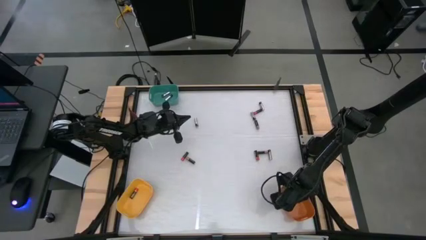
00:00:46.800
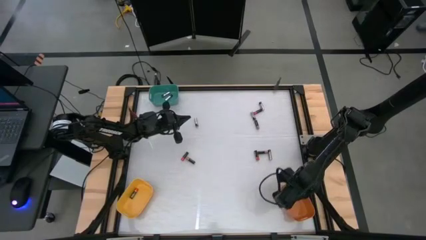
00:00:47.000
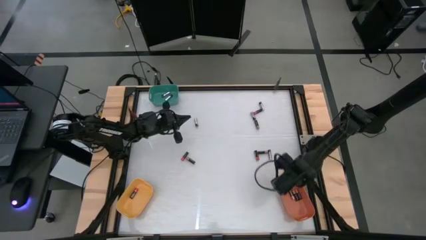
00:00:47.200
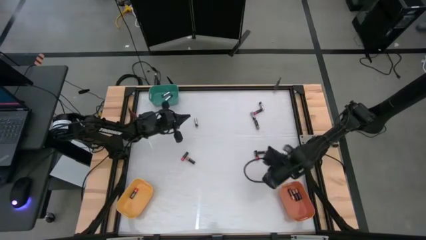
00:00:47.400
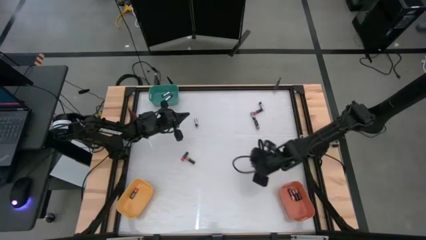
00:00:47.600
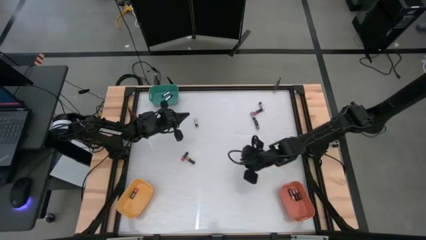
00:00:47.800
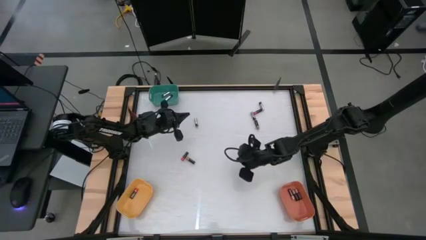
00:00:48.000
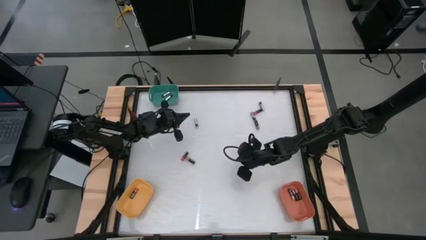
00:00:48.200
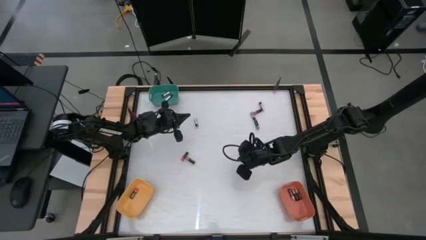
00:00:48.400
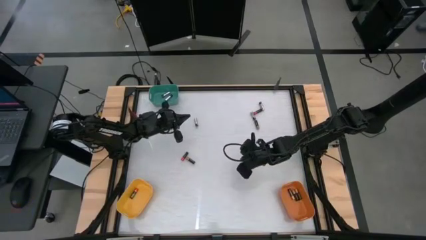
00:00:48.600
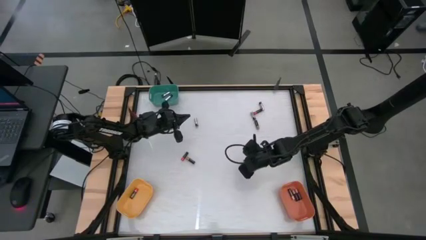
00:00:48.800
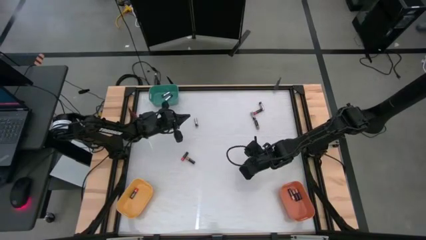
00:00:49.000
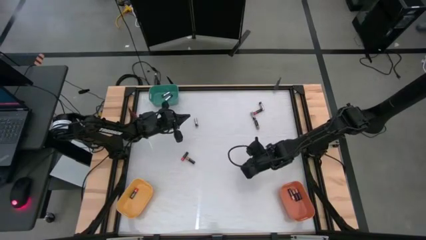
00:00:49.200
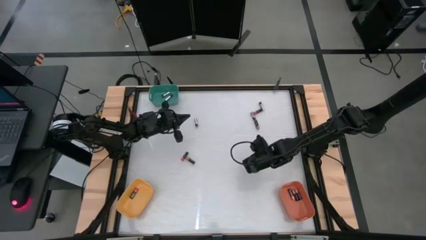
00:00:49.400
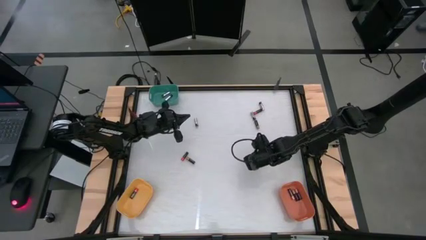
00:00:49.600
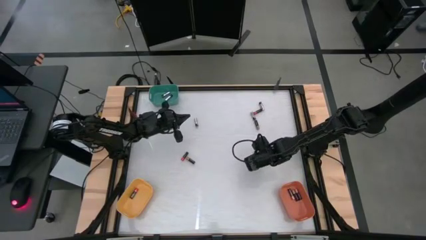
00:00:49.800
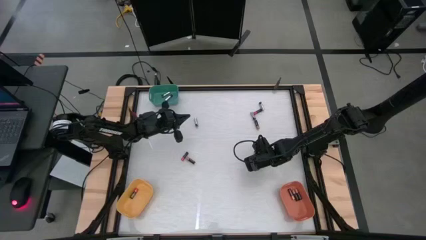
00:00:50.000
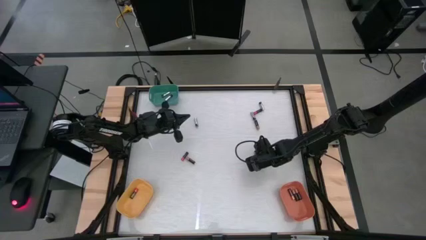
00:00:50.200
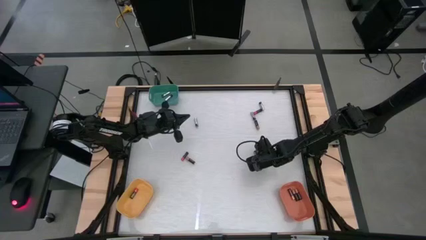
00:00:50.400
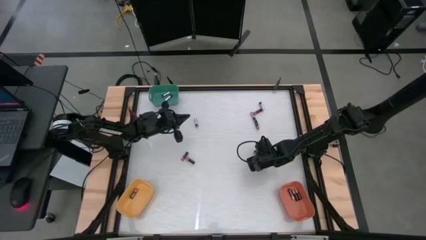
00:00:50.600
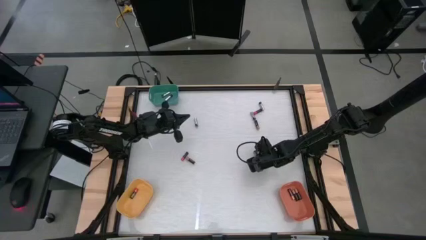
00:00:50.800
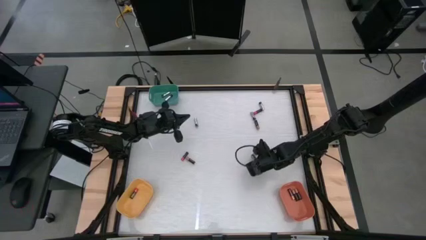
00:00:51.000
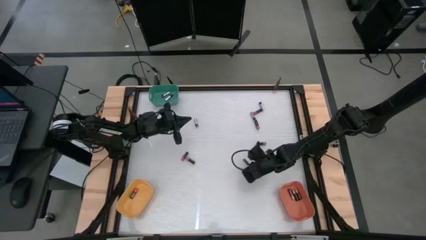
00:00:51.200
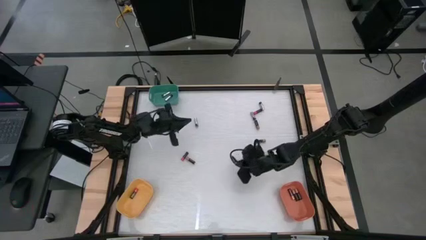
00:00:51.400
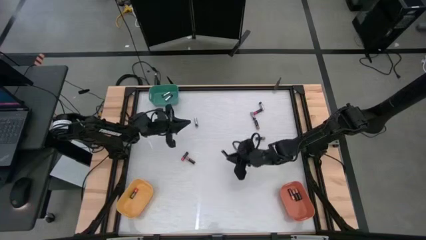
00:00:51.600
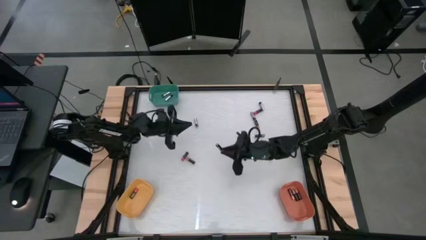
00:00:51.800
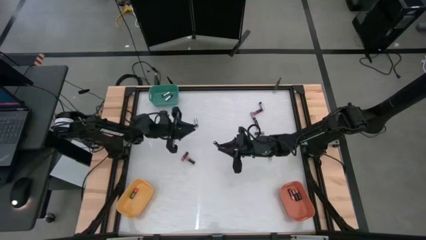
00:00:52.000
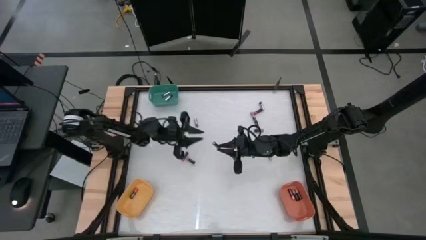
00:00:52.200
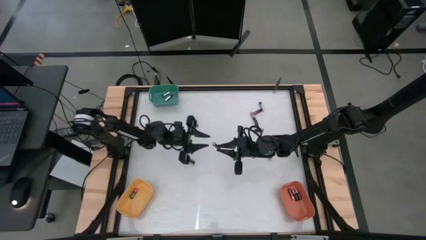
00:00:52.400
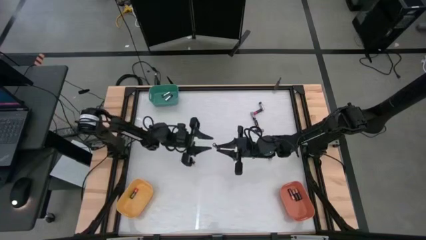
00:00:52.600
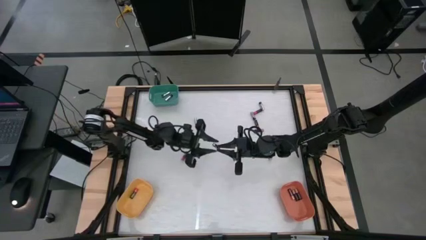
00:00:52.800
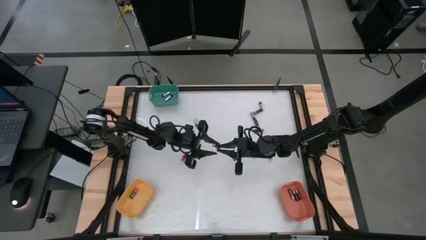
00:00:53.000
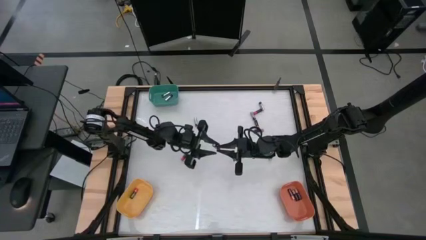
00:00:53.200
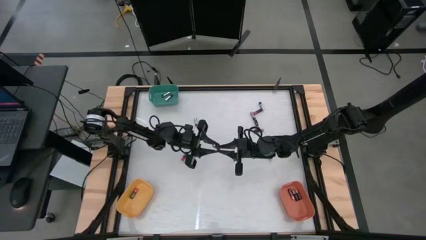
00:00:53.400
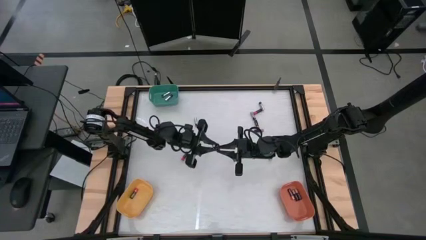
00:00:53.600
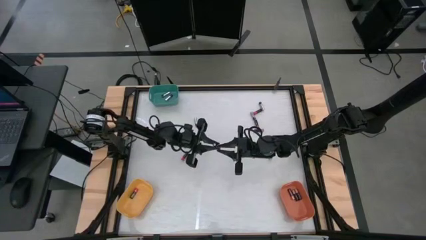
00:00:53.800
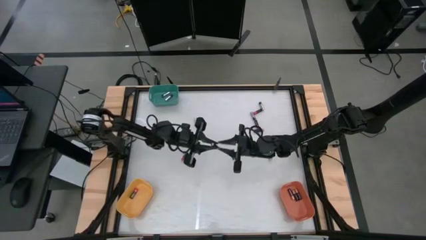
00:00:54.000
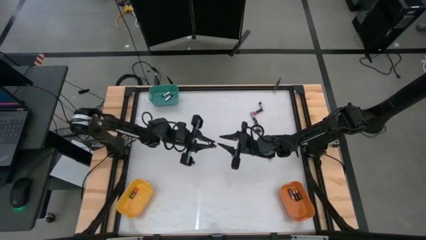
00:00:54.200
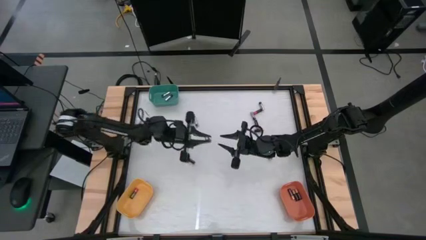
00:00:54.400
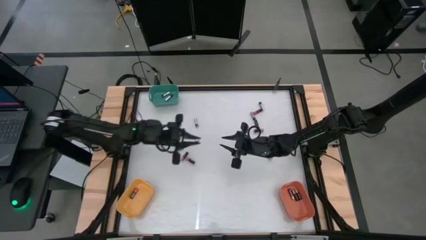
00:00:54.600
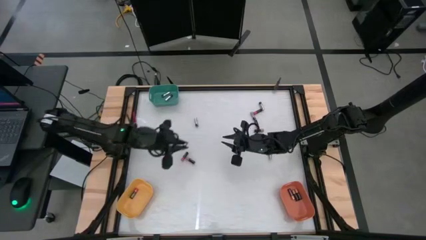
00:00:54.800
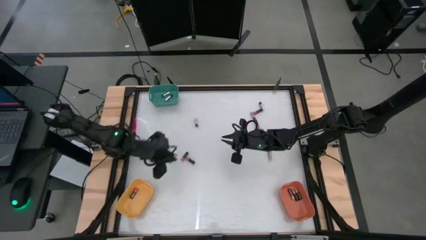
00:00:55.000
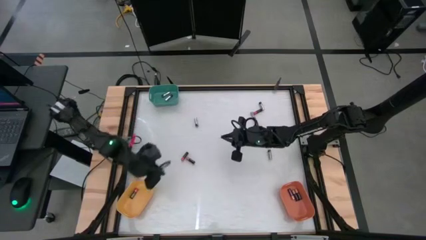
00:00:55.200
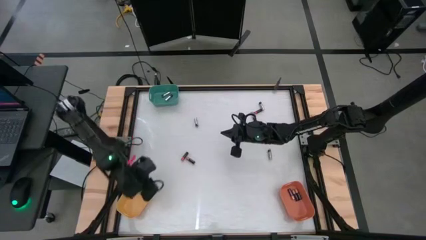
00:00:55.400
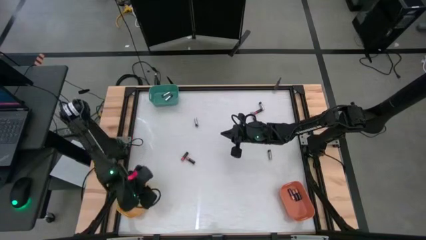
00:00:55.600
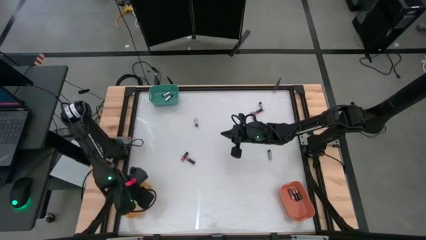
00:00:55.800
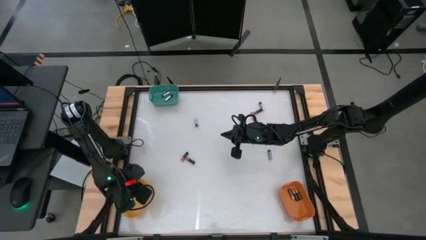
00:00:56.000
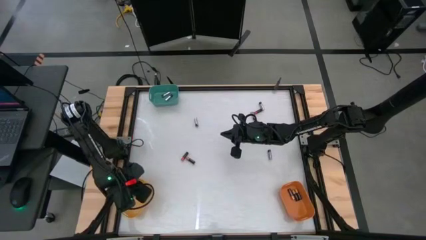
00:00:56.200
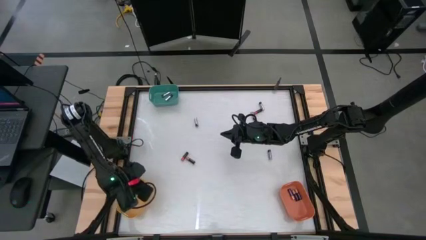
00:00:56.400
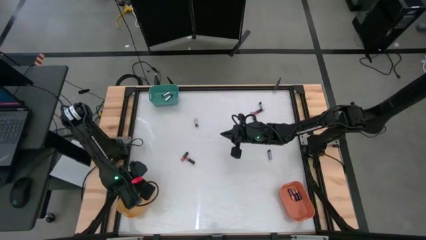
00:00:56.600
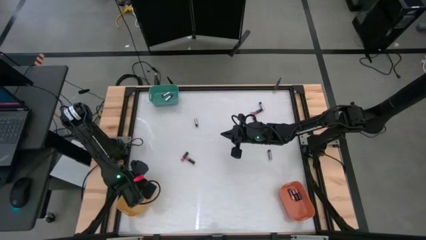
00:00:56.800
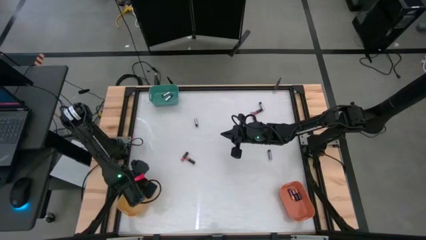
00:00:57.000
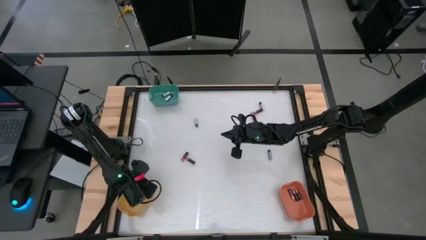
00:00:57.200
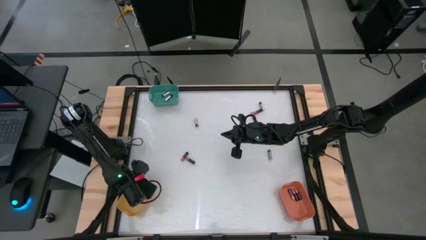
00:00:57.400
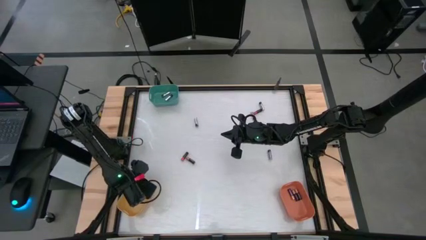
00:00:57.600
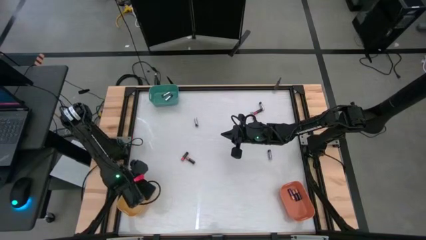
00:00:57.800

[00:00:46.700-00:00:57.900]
Task: Sort batteries
Put the middle right red battery into the yellow bin

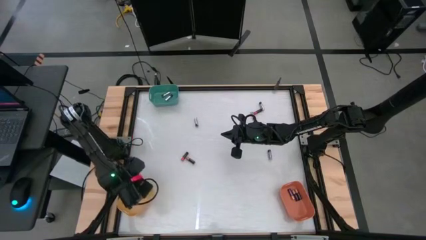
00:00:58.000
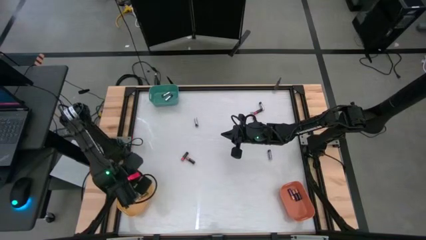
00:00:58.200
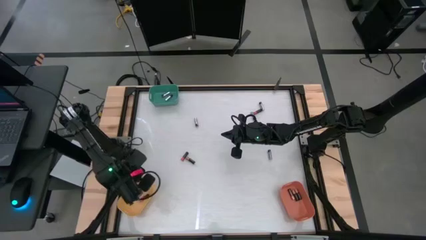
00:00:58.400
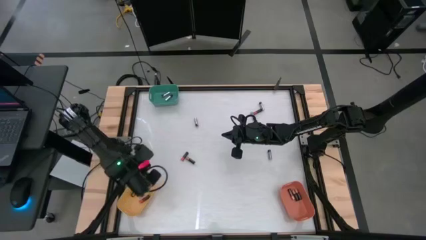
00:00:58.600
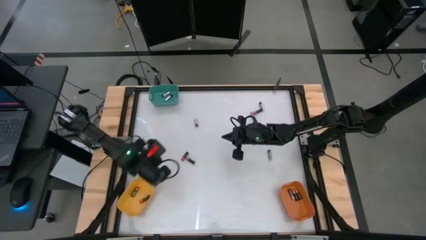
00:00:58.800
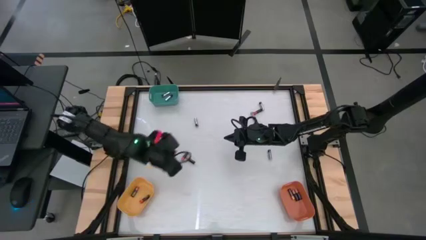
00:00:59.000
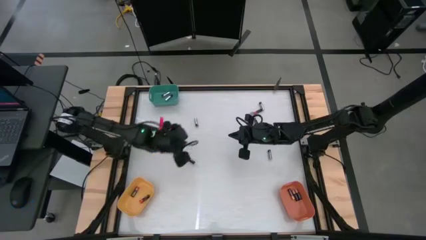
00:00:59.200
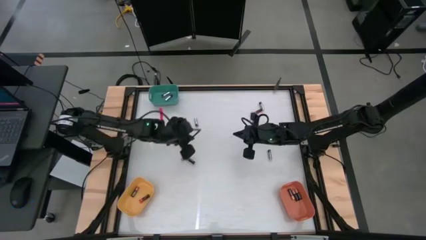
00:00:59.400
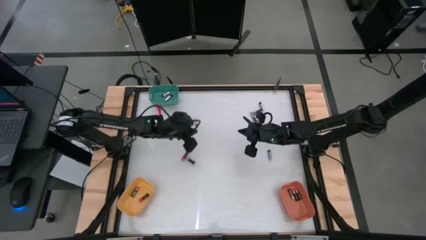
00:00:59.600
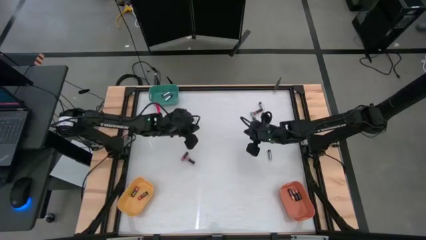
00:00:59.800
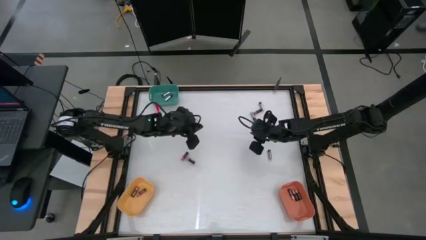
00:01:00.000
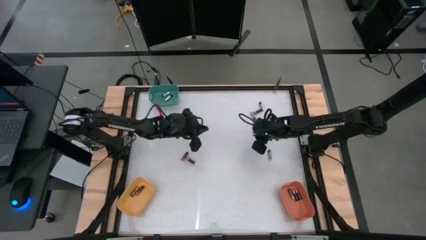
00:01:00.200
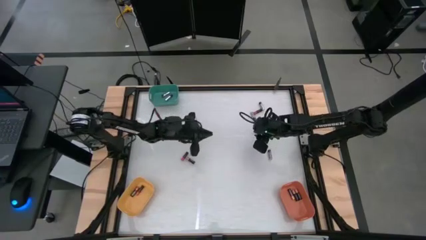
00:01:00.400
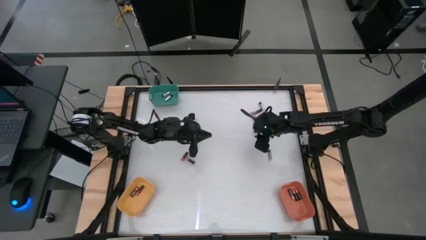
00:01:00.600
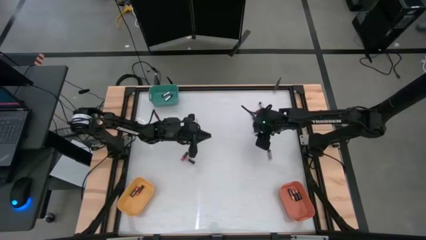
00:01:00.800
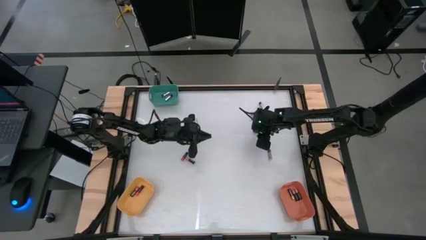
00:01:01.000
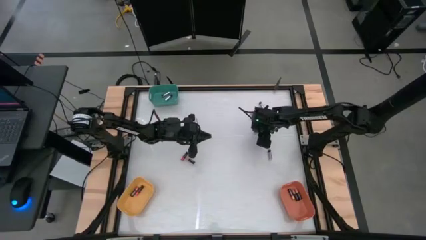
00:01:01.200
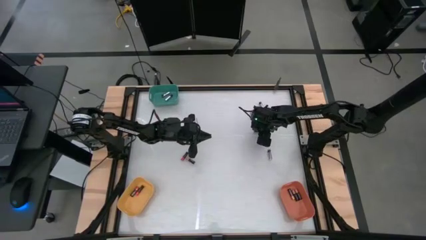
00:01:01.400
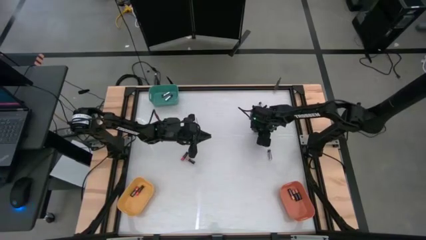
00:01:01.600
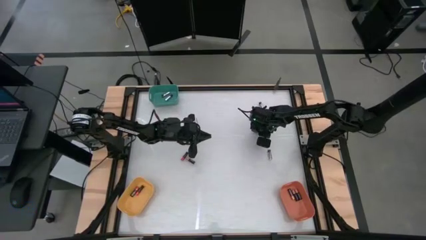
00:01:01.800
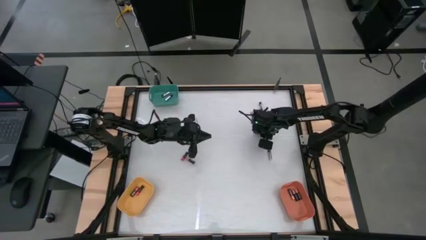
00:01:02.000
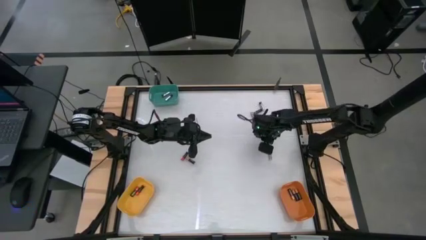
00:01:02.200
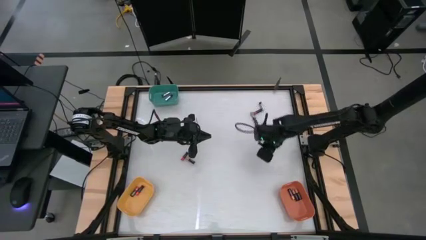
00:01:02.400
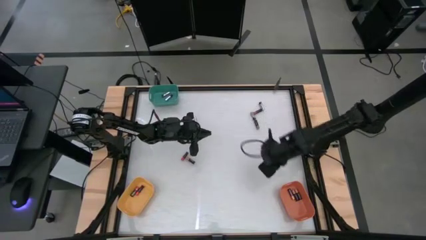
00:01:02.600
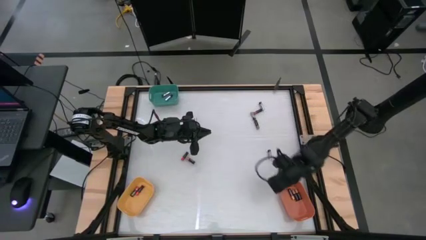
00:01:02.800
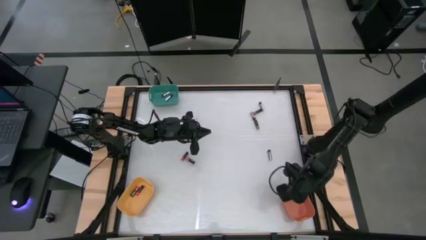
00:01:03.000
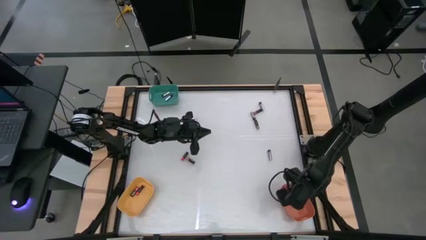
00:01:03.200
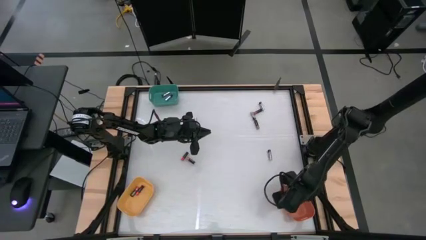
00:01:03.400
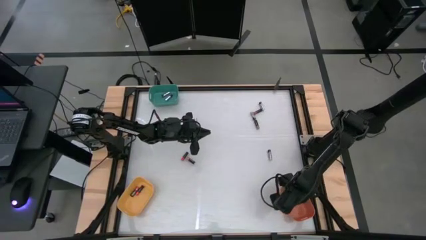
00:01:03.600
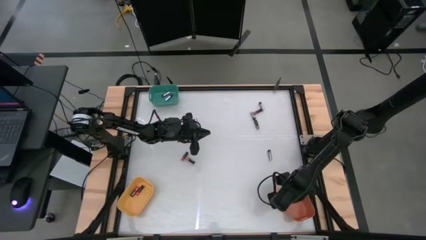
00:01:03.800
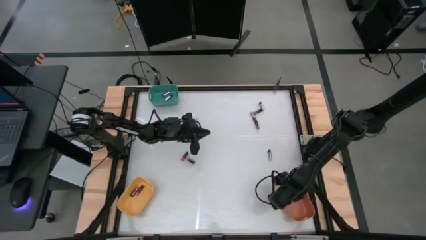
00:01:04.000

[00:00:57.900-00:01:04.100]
Put the middle right gold battery into the orange bin
